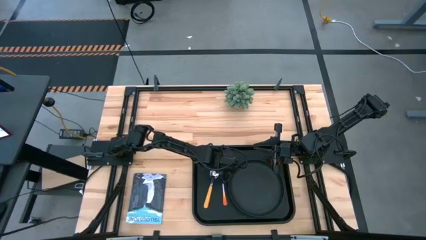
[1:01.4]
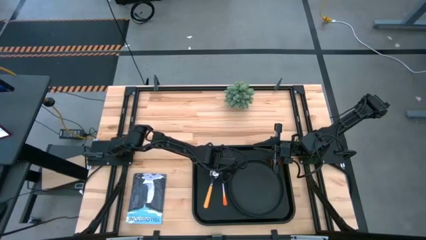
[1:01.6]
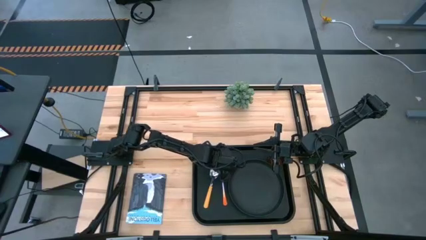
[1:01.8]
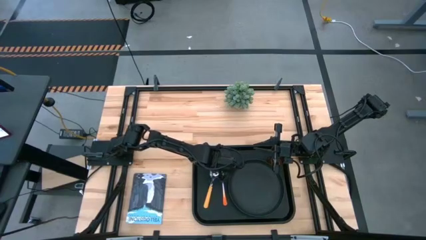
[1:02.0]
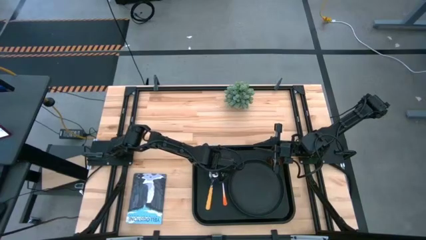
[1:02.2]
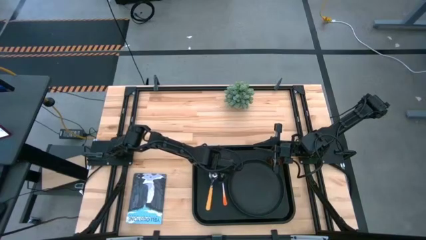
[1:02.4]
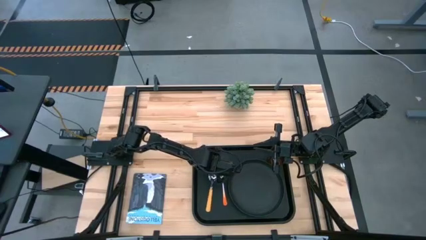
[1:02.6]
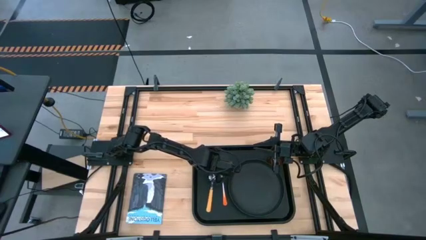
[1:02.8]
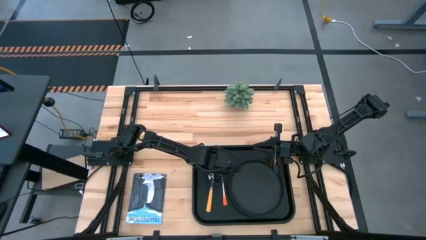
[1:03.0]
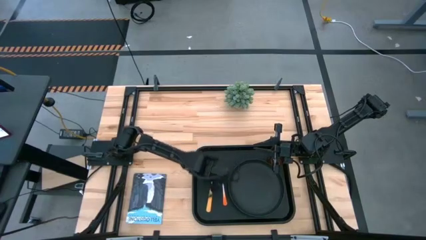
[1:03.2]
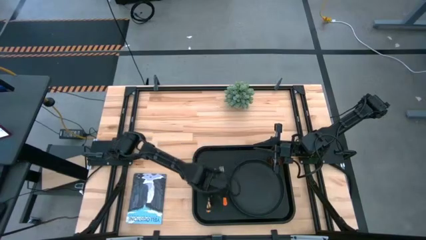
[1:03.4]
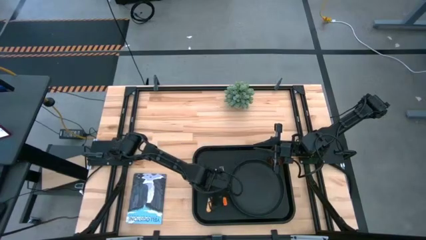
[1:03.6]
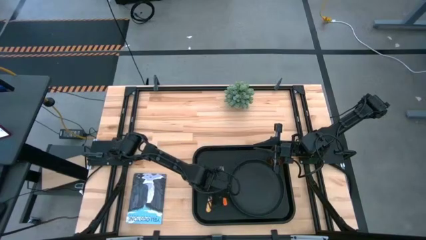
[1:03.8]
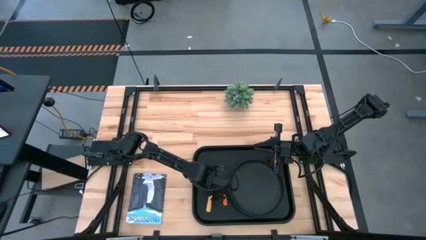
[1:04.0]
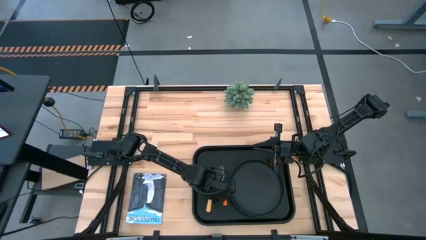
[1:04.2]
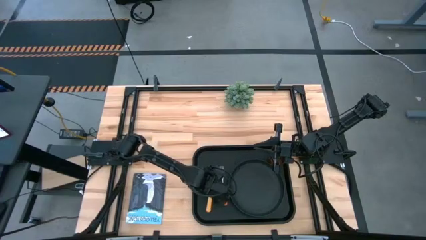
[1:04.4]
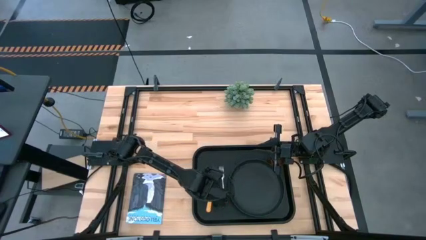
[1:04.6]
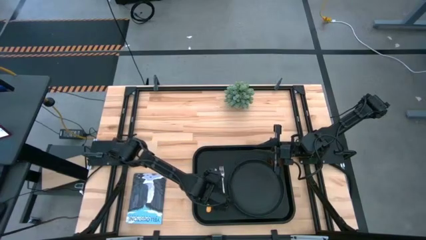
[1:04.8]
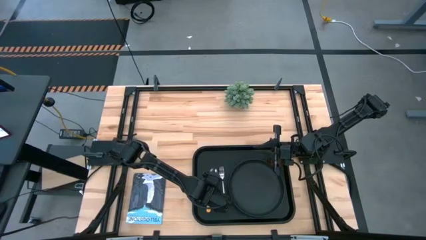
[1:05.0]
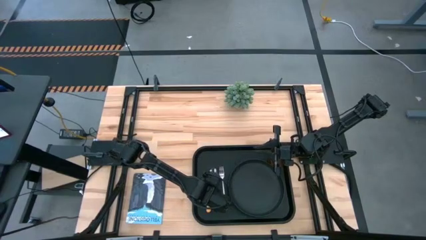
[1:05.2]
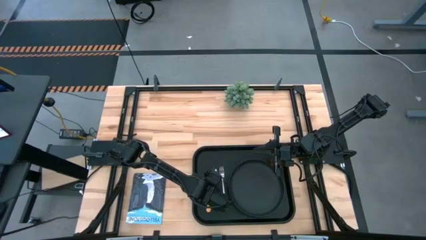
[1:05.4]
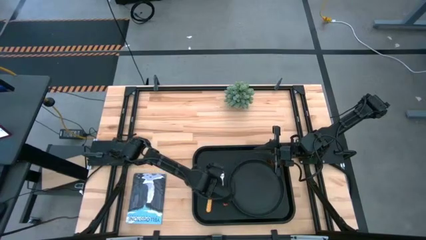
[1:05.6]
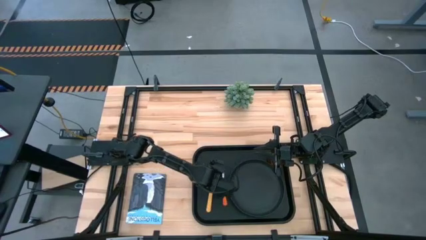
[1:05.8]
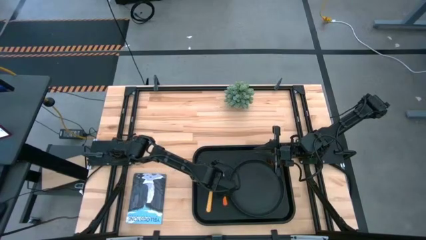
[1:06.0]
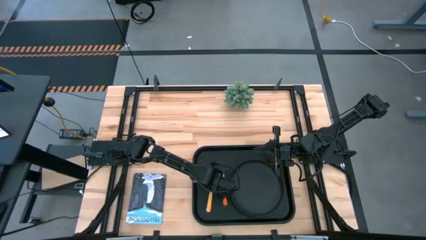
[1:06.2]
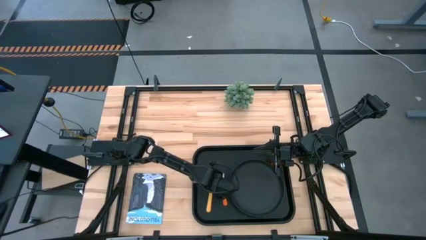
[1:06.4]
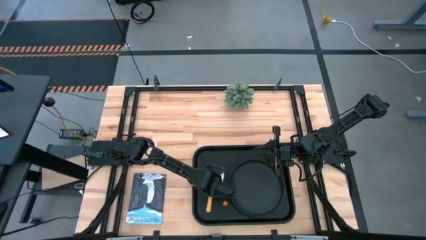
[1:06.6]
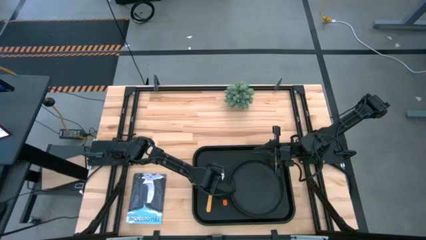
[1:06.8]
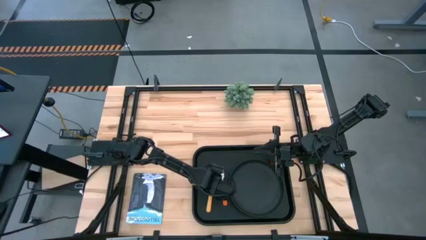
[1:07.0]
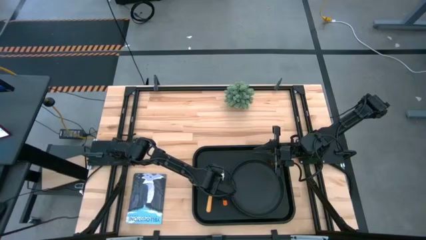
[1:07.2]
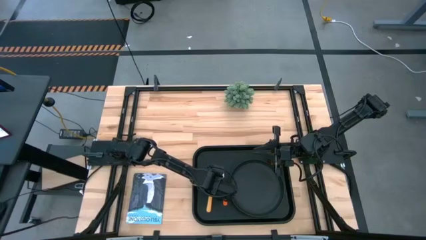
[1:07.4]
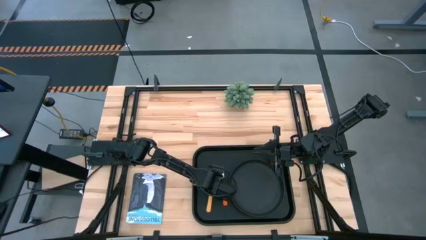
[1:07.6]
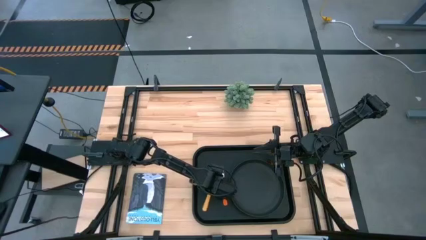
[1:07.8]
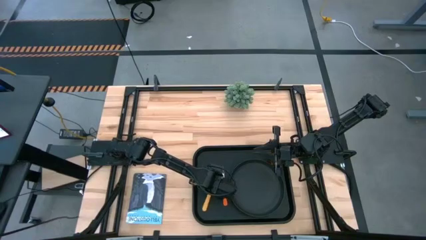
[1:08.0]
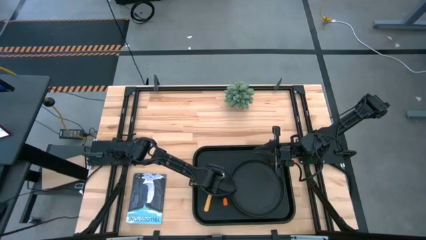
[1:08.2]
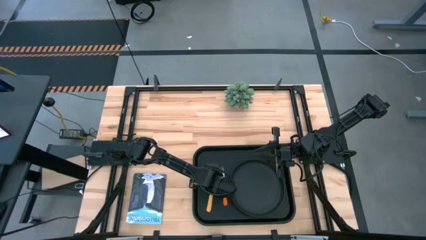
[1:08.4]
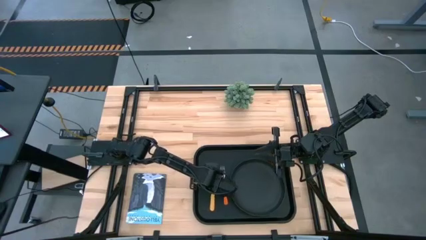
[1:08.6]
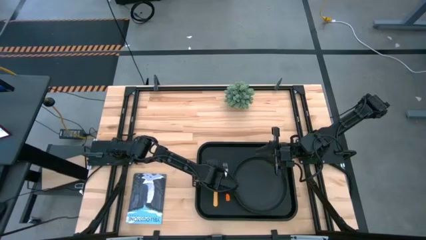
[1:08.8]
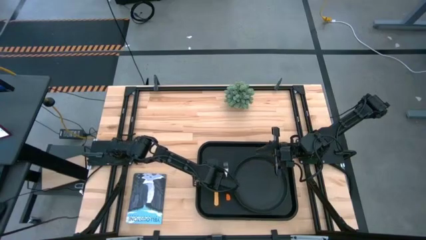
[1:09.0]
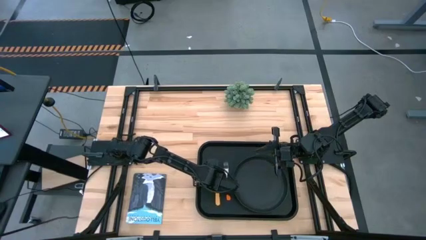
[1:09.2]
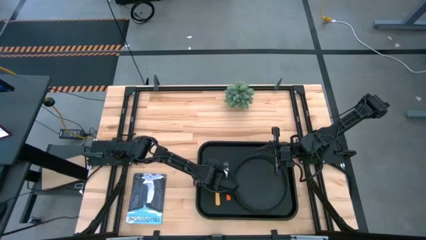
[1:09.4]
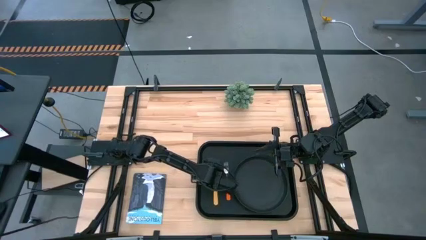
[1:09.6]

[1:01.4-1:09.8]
Task: Pick and place plate/cup/fork/spoon on tray
Adjust the yellow spoon on the black tray

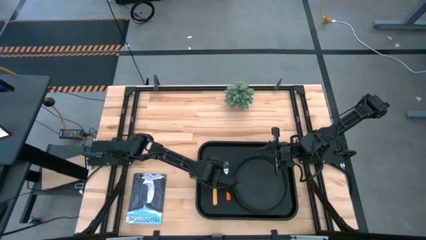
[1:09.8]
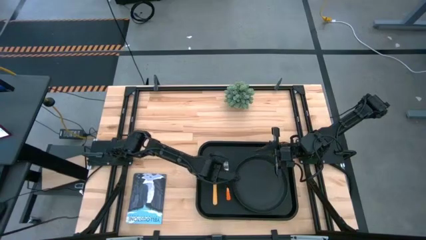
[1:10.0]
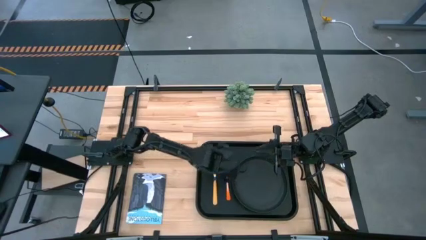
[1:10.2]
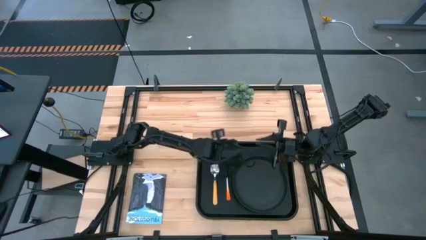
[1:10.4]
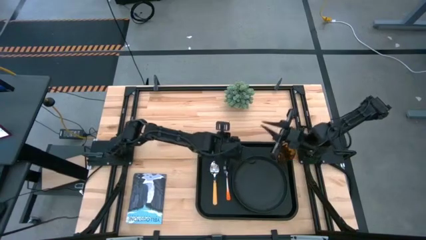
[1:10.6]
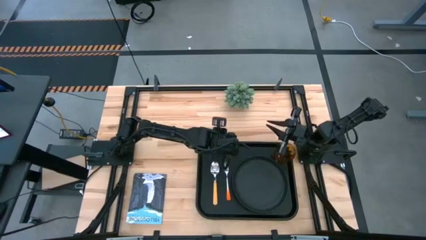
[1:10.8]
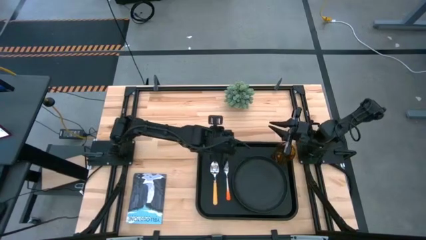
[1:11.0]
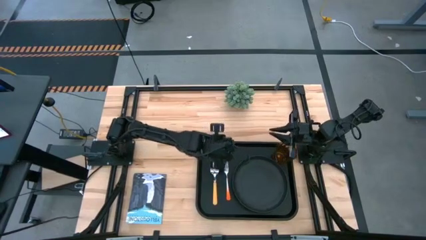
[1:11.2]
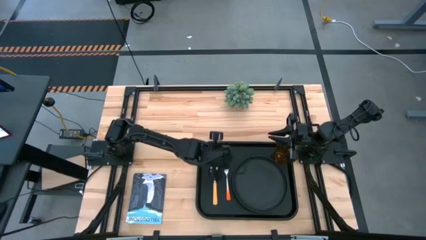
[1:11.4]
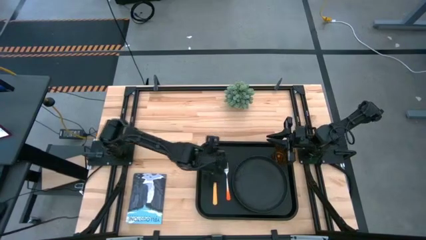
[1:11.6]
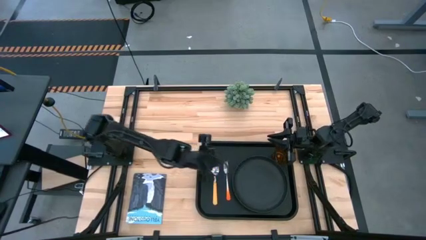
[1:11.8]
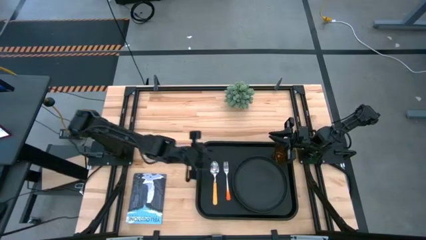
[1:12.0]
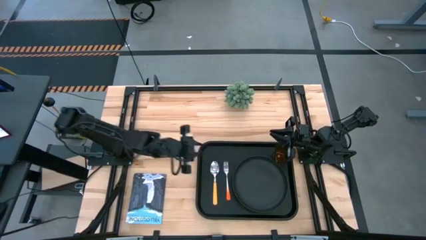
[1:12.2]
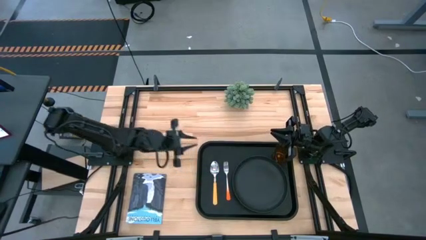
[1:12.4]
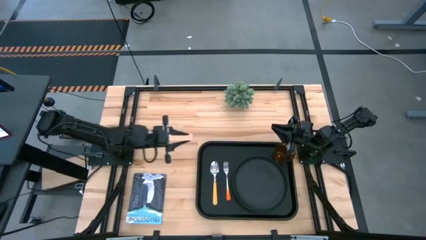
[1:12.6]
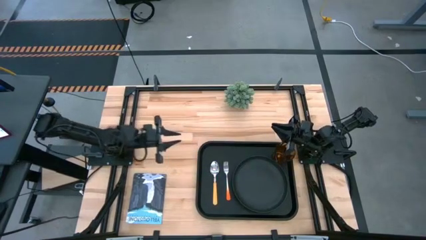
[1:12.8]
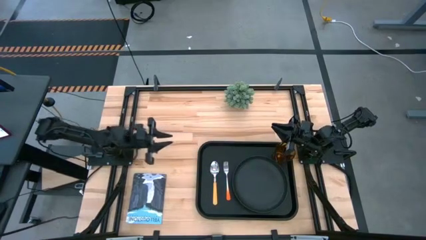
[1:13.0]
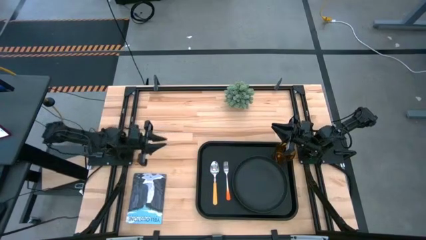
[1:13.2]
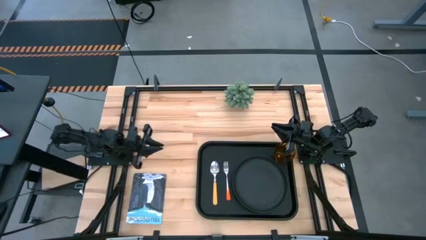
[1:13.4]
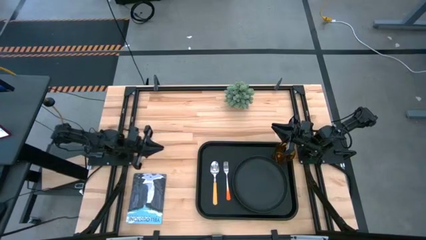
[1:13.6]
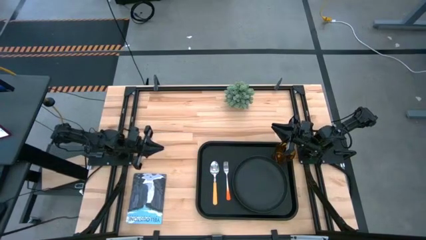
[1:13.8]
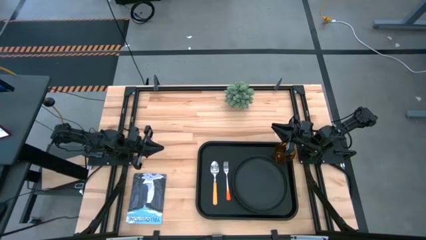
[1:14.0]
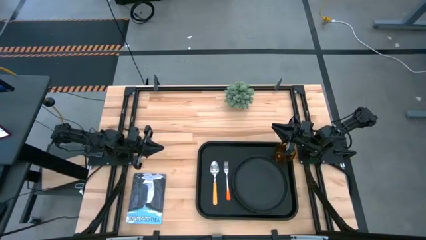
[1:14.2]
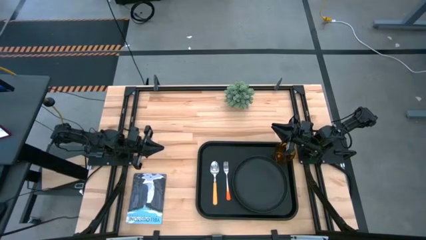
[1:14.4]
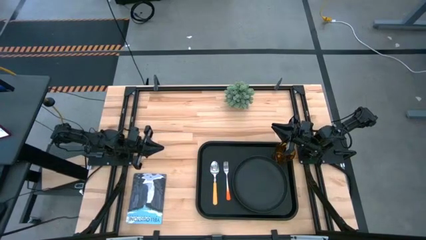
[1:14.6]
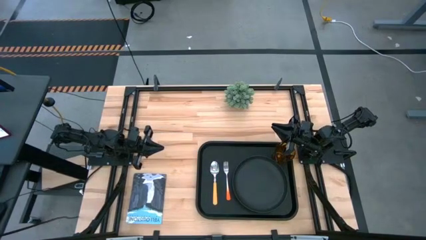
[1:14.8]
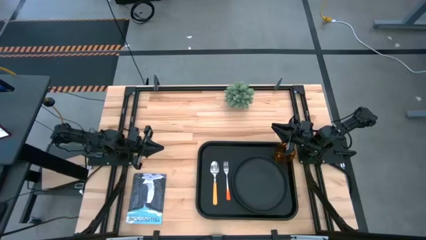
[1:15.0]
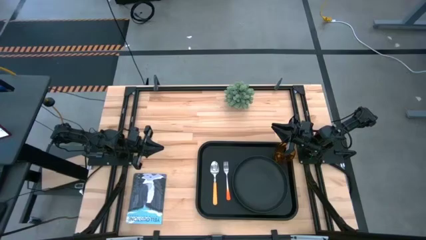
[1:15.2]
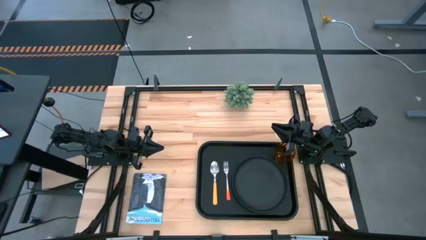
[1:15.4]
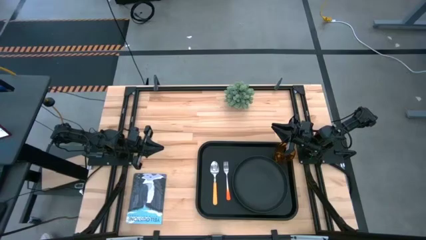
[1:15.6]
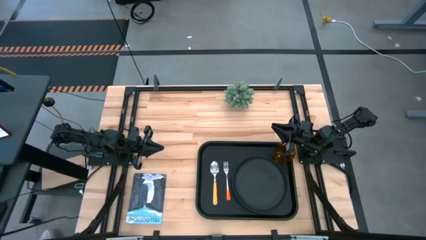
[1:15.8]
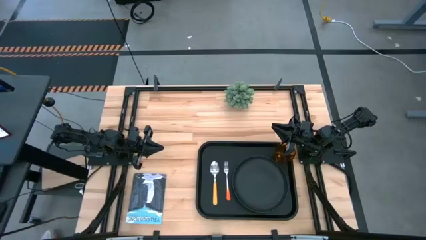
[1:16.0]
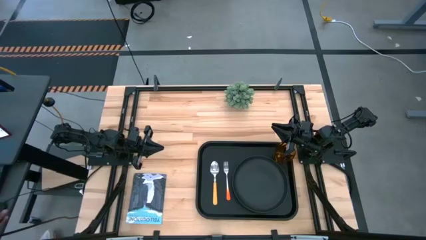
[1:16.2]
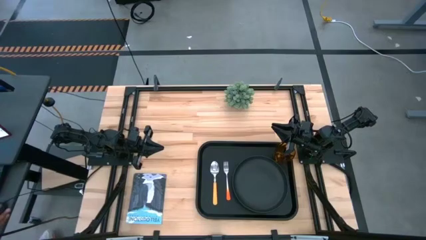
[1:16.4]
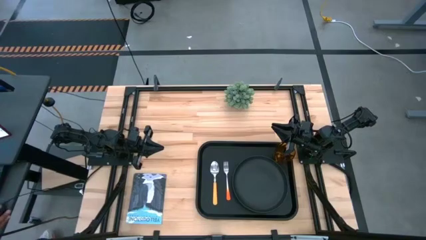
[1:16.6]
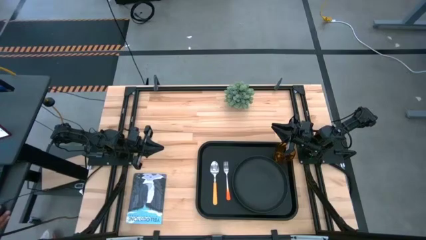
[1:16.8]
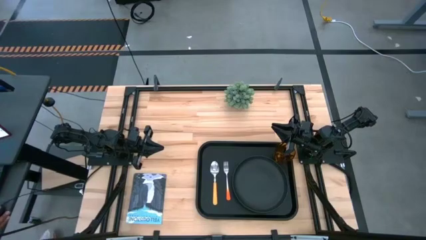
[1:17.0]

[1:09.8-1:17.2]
Return to Home Position

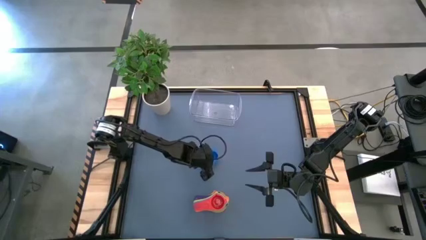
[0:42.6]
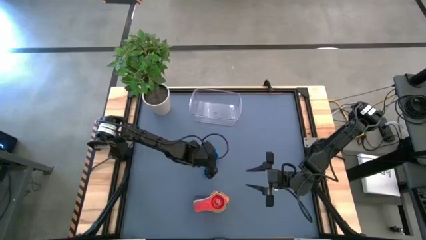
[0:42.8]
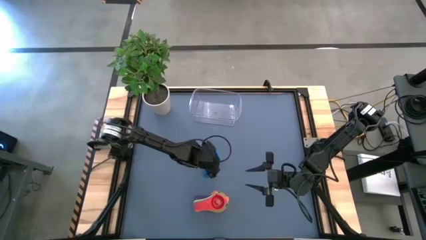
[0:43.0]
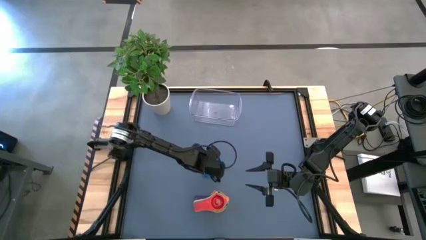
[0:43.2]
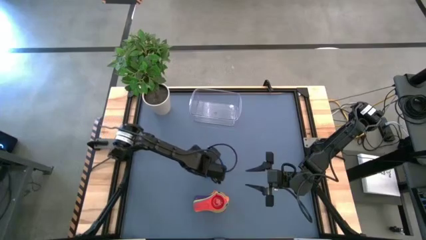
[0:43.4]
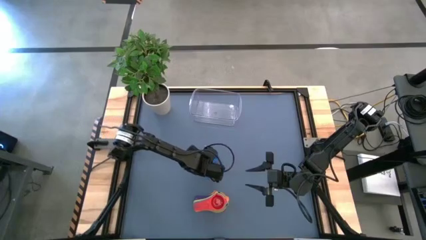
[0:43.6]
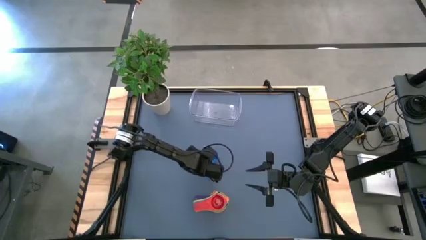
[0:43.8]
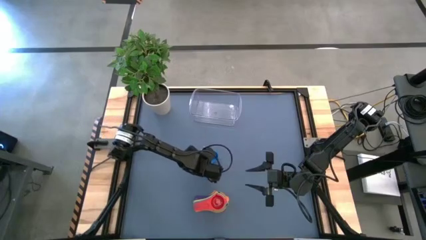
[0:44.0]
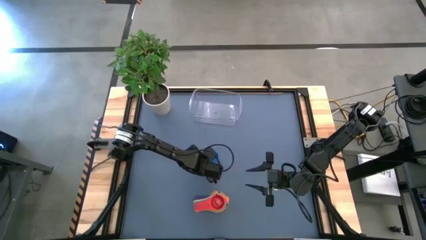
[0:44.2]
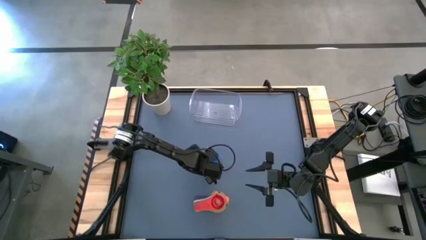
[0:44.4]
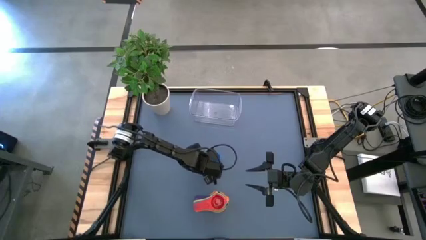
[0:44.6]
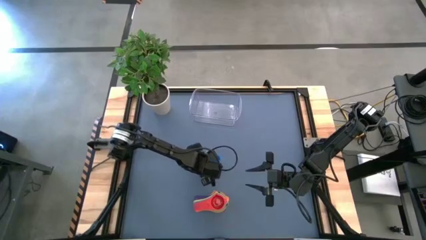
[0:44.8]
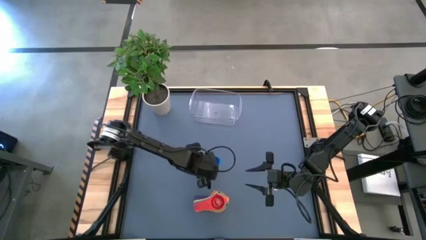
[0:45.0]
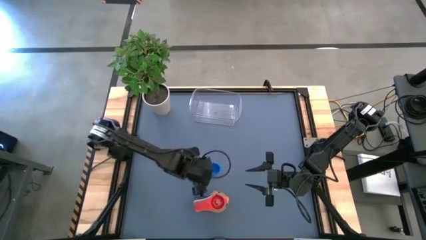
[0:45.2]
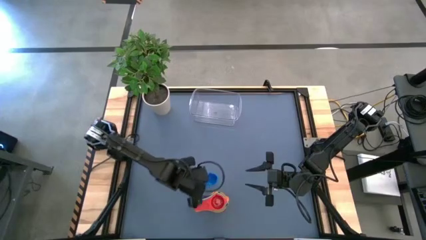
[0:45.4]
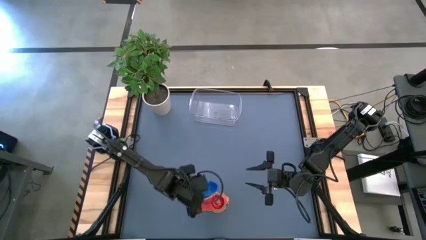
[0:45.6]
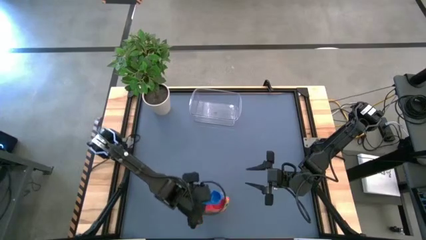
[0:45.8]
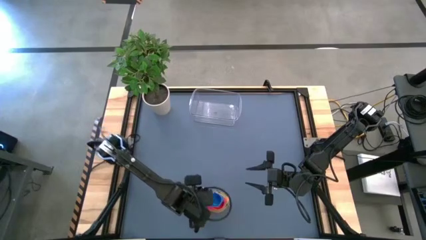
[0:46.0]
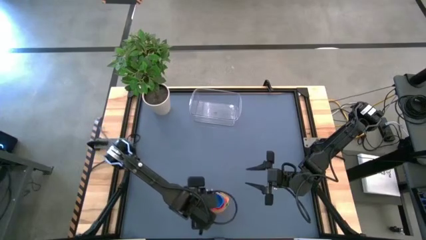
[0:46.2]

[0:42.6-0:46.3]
Task: Nest measuring cups in basket
Stack the blue measuring cup on top of the red measuring cup
